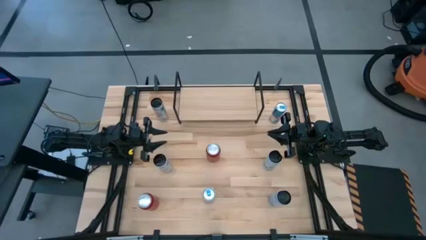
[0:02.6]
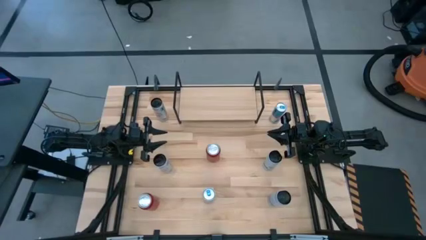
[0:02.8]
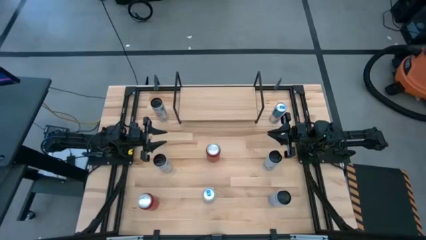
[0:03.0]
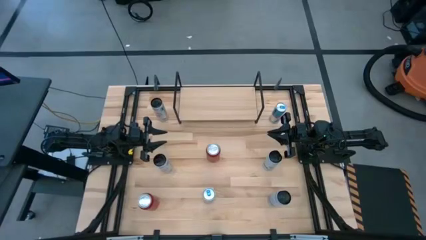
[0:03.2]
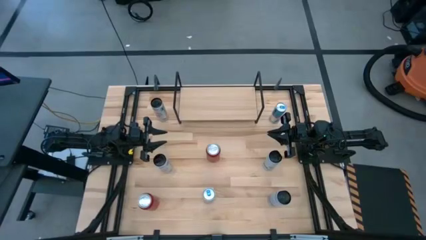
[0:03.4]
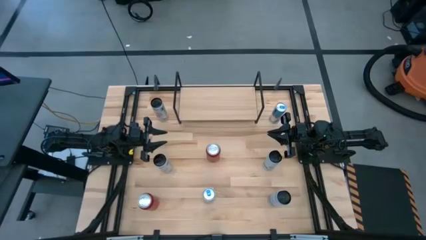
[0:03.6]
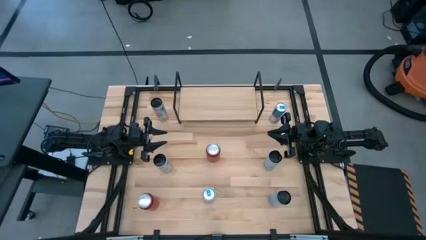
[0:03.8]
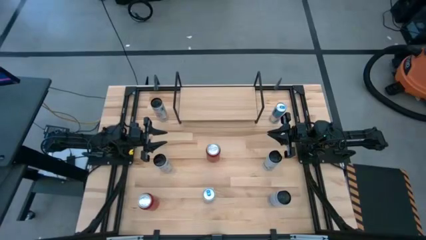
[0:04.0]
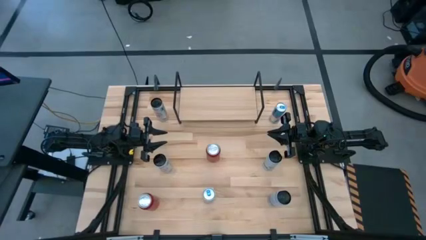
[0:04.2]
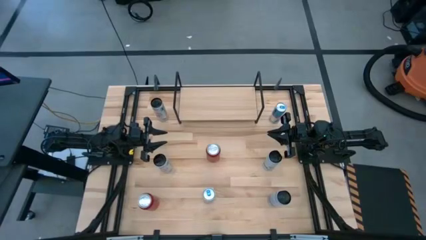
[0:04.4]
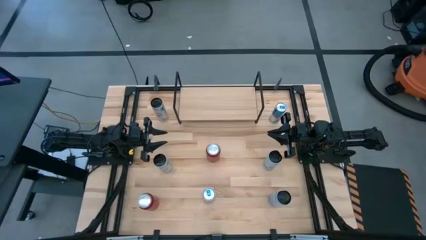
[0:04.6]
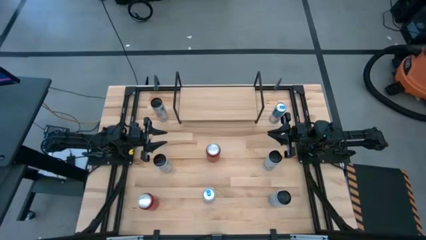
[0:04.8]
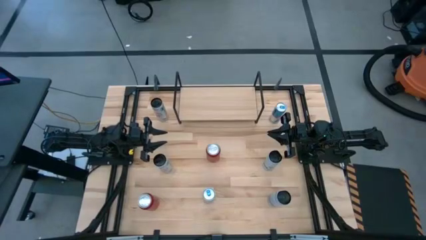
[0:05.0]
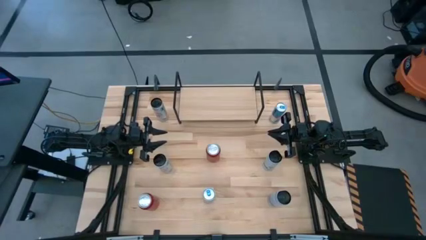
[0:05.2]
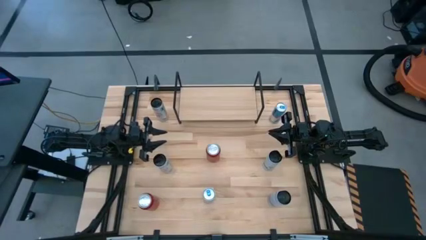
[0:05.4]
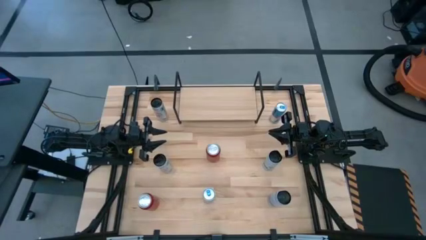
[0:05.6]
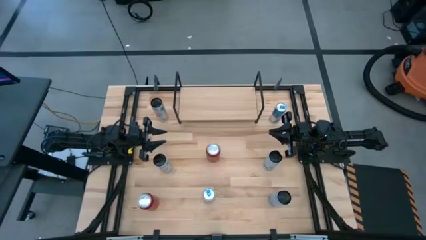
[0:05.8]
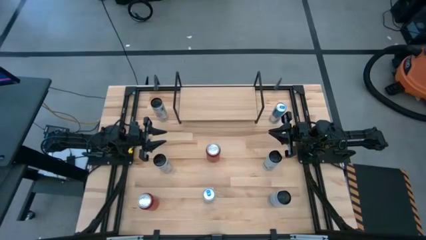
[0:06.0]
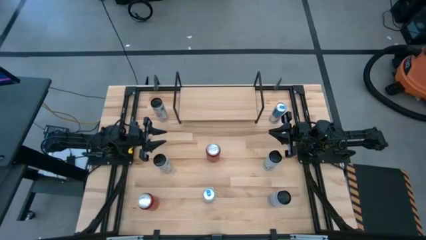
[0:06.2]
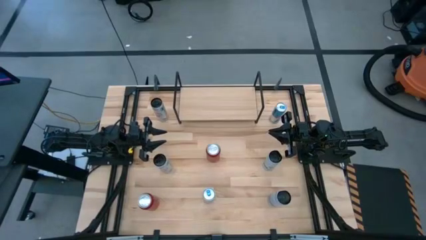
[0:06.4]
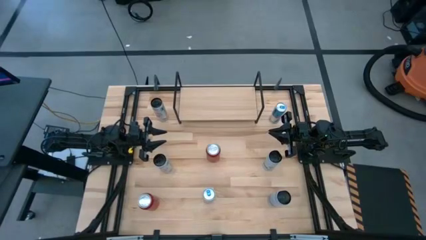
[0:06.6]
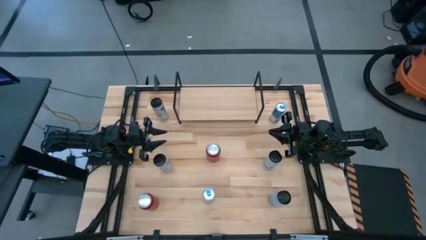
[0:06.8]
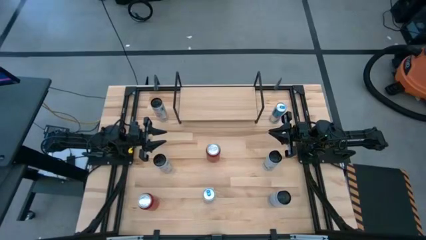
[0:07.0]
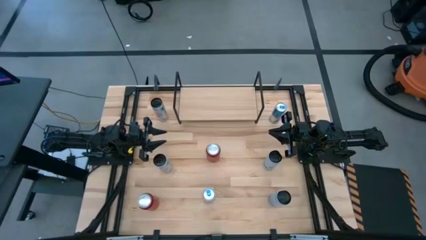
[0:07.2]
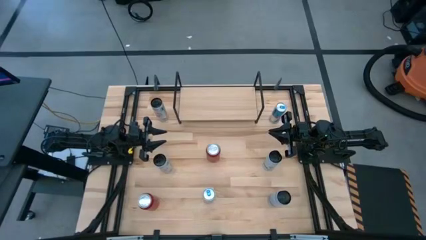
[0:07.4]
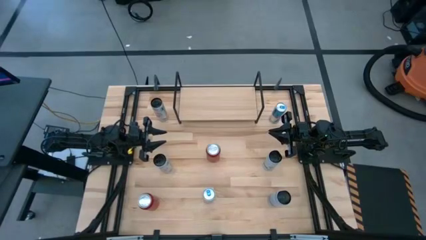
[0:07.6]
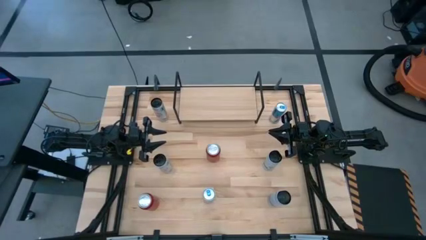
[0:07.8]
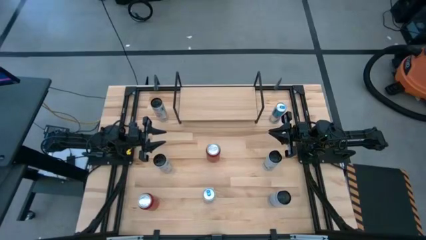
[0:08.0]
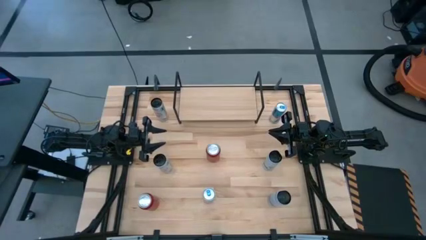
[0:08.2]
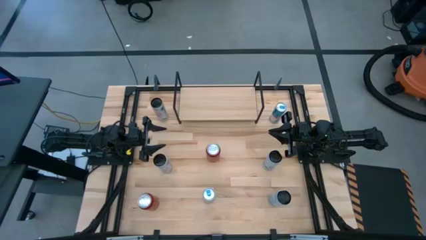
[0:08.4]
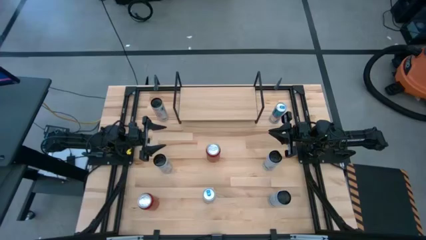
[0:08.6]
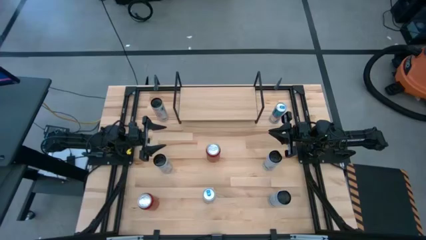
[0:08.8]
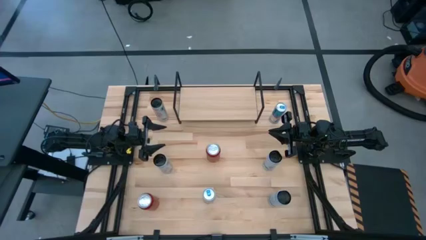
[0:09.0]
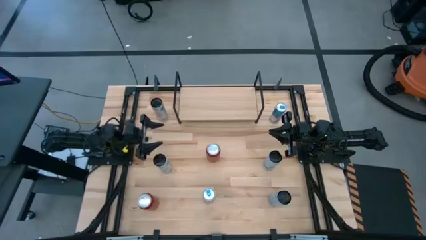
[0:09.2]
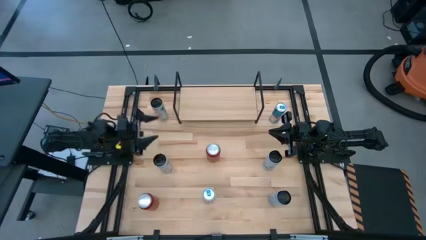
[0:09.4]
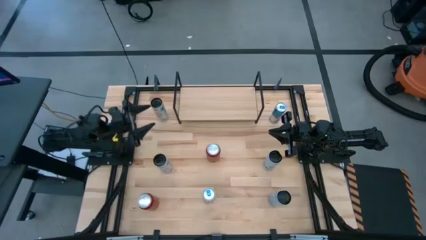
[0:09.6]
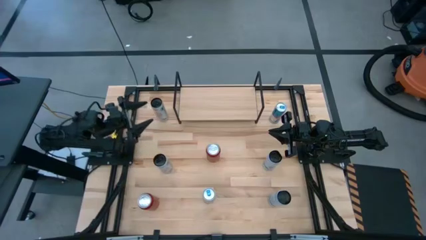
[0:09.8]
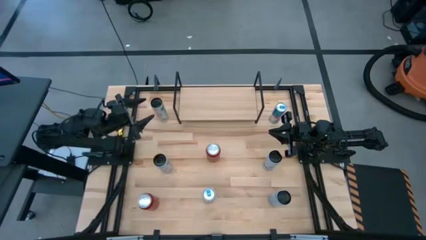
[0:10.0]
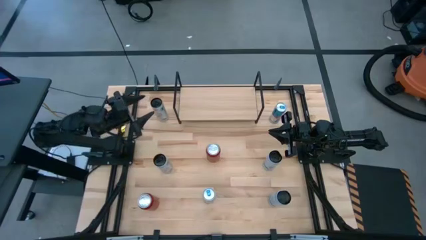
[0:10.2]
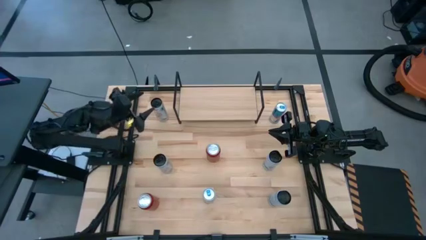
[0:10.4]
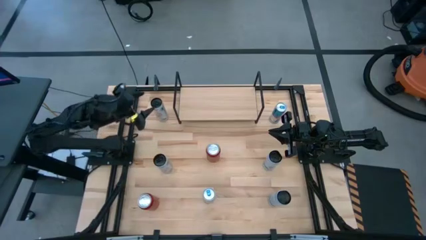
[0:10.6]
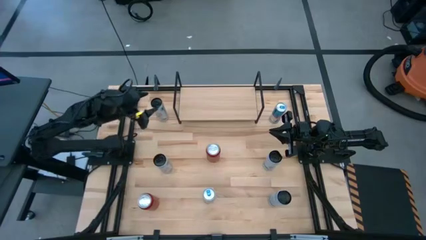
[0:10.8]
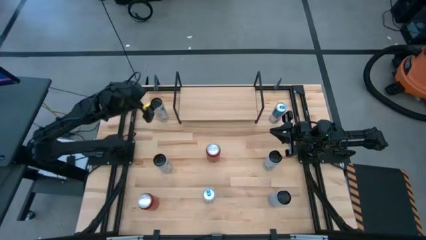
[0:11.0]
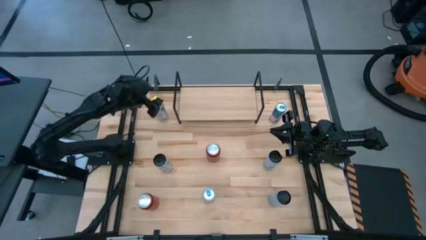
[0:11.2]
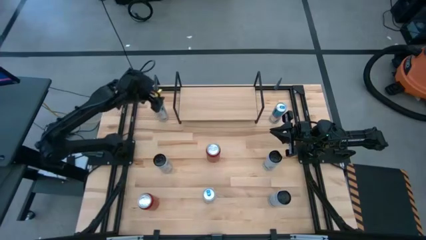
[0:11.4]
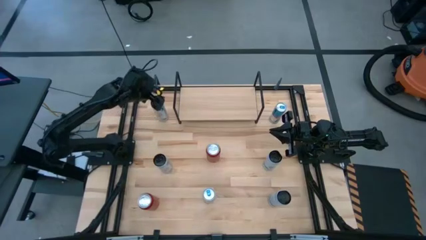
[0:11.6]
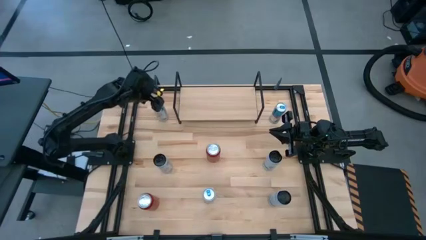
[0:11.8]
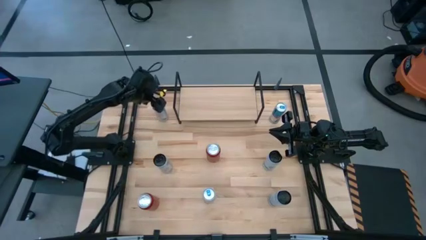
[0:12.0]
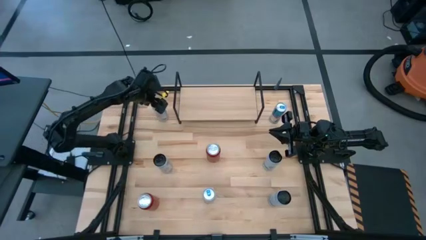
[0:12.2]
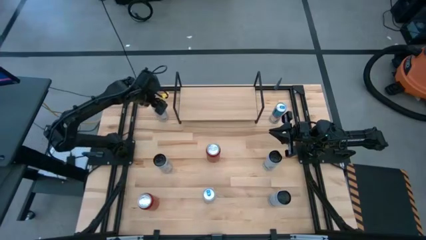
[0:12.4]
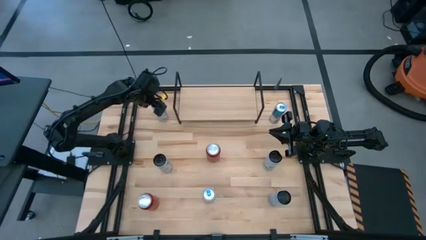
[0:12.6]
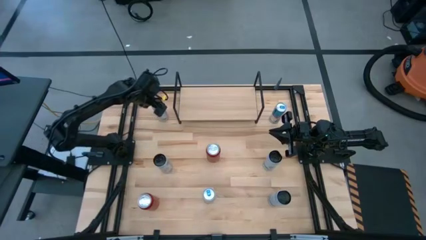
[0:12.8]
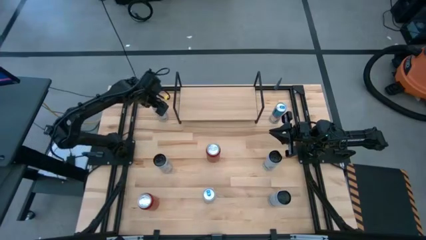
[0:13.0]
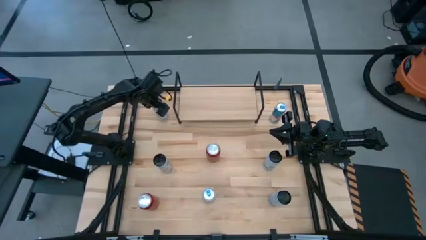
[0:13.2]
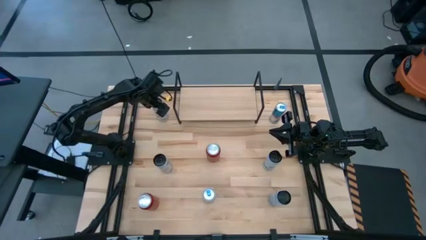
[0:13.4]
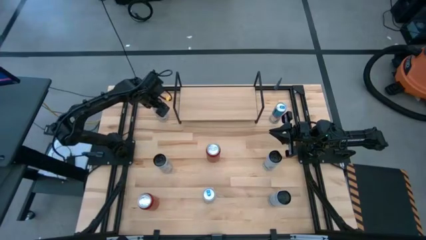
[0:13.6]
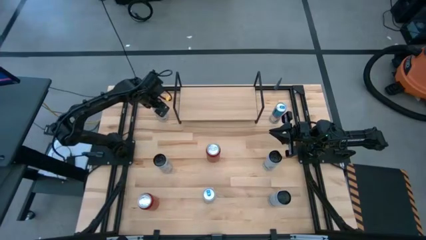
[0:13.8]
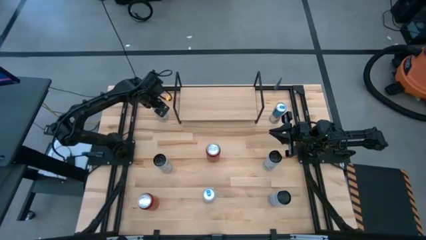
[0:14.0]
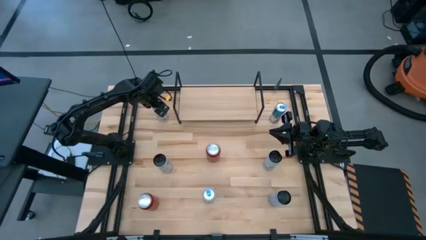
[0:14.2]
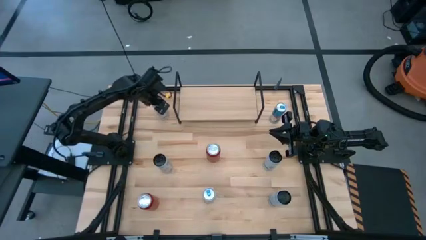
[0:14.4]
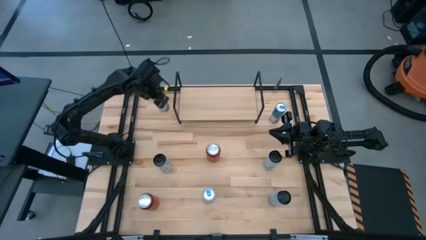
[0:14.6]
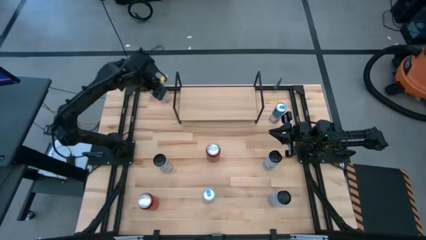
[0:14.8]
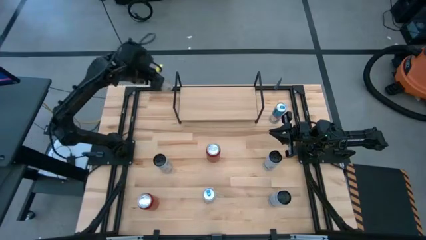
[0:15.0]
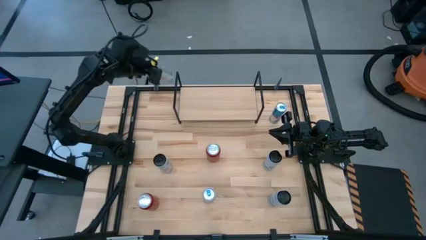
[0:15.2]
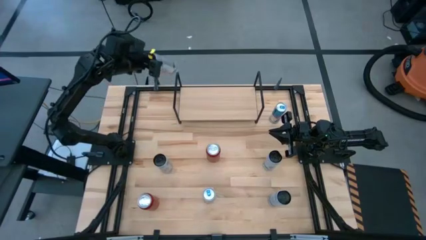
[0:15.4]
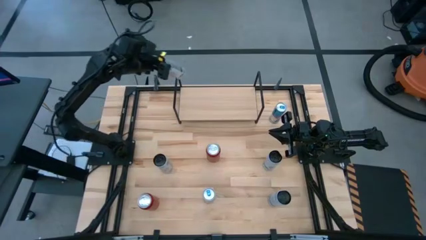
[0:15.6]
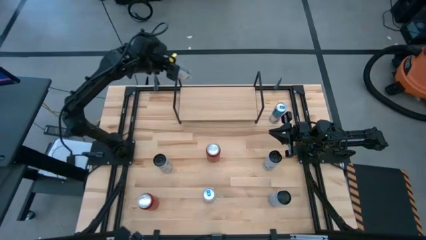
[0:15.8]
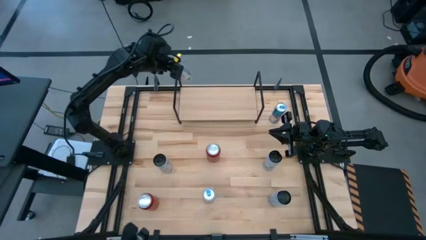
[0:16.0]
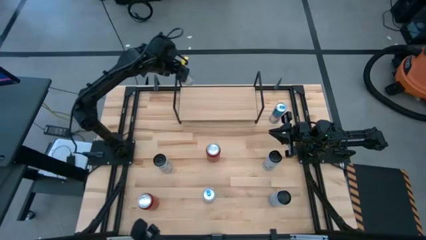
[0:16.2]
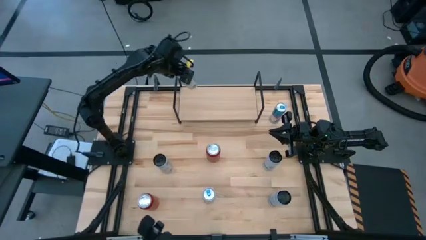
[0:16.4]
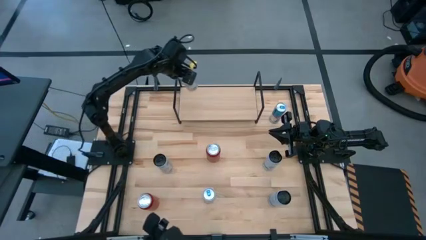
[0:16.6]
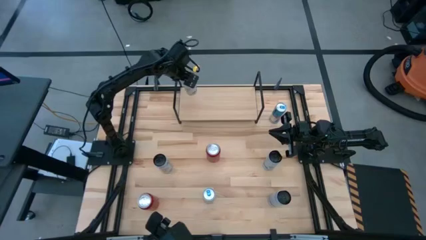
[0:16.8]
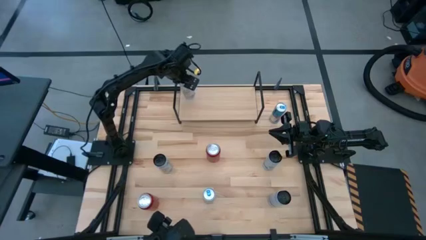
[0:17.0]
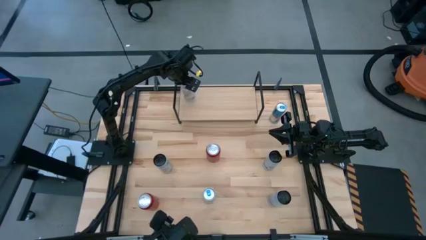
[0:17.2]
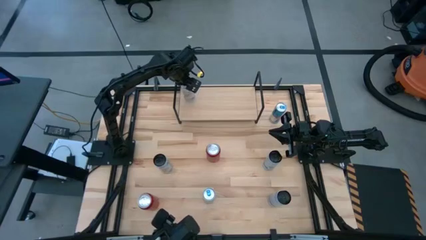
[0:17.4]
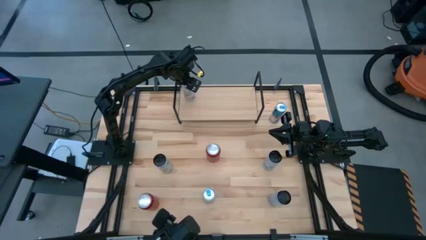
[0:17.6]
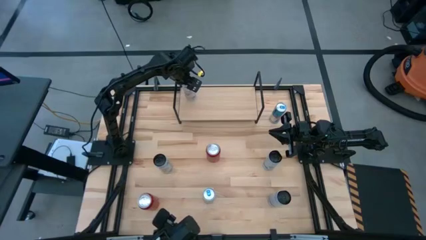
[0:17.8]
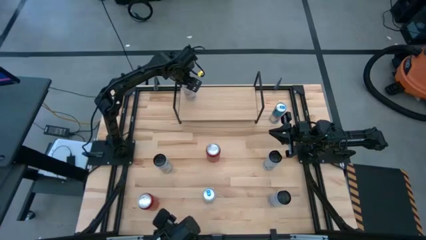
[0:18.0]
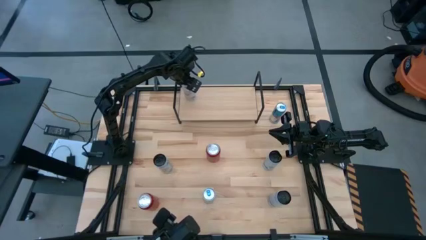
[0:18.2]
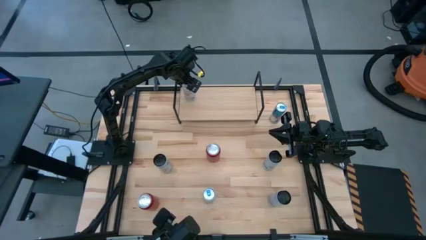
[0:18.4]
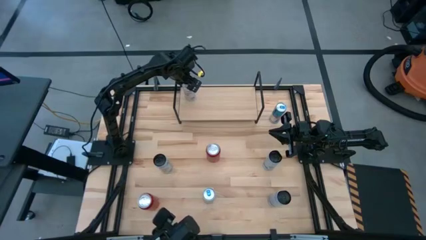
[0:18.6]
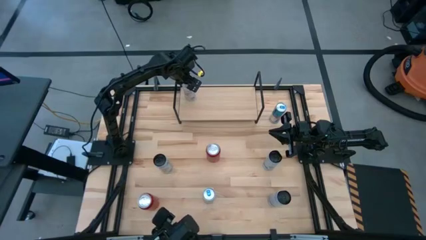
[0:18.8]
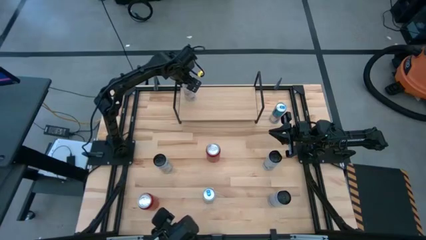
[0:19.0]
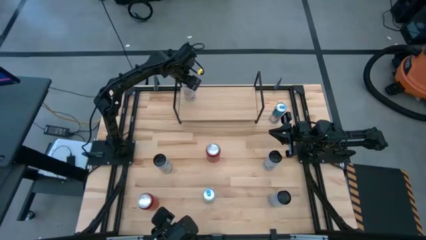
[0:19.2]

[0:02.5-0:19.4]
Task: Place canned beverage on shelf
Put the top white-pink soda can on the shelf
